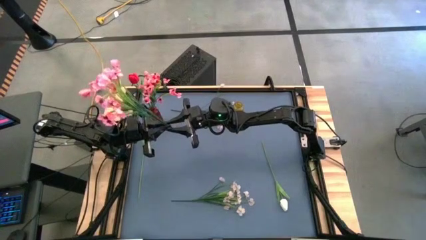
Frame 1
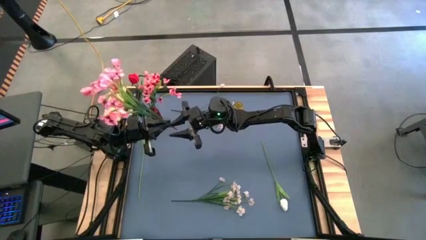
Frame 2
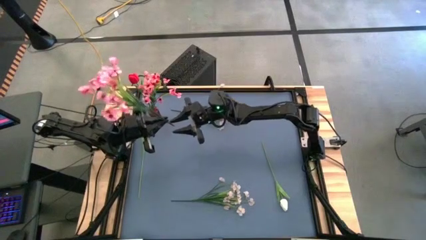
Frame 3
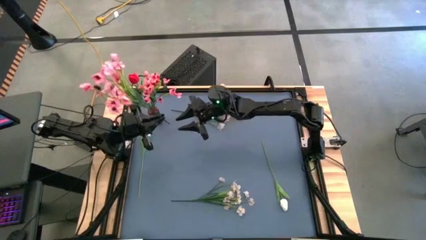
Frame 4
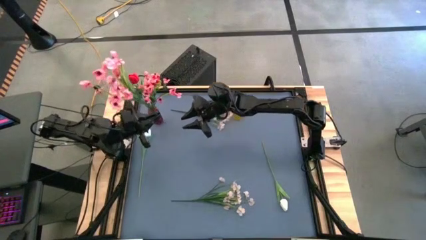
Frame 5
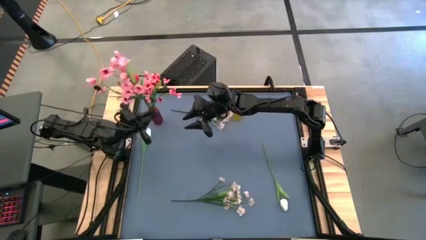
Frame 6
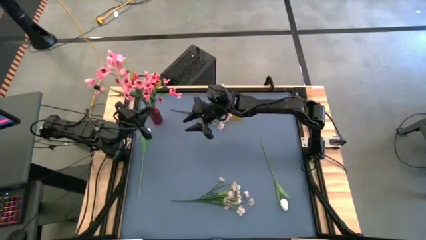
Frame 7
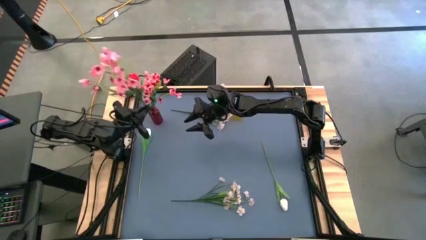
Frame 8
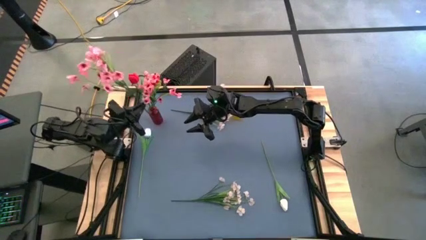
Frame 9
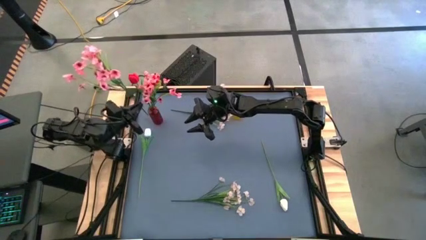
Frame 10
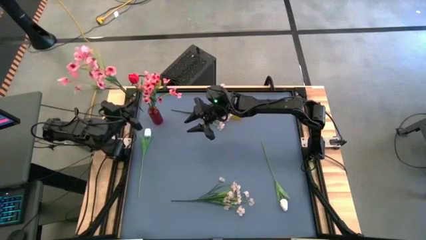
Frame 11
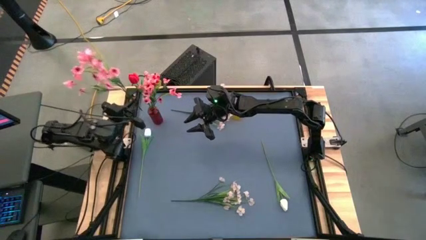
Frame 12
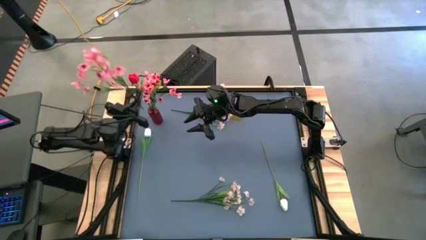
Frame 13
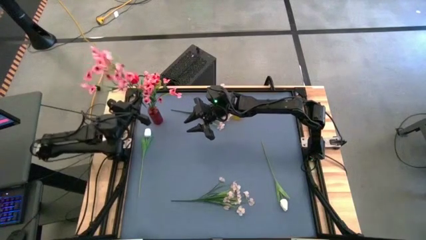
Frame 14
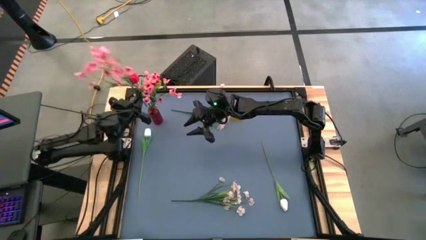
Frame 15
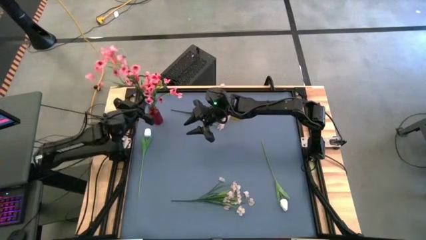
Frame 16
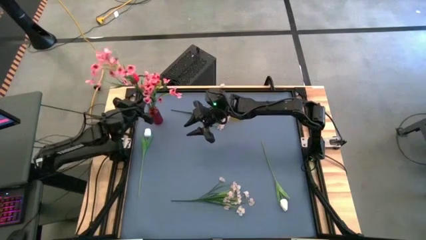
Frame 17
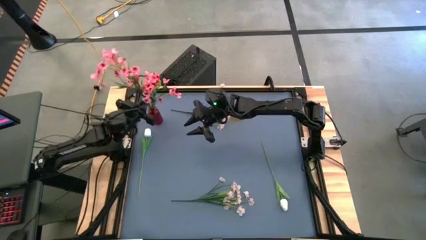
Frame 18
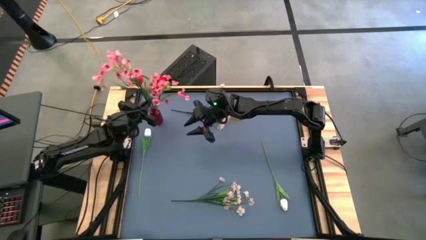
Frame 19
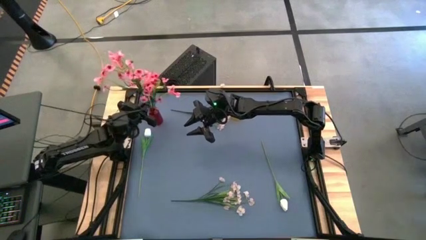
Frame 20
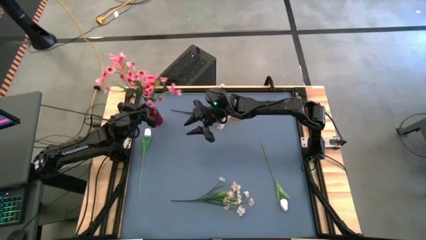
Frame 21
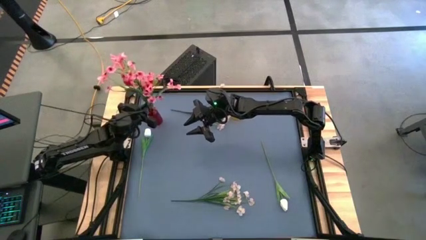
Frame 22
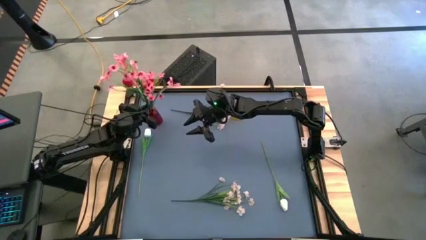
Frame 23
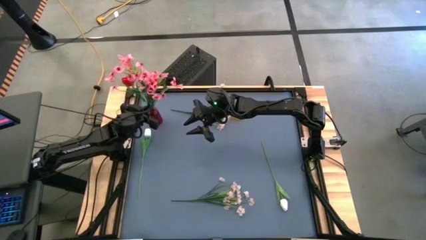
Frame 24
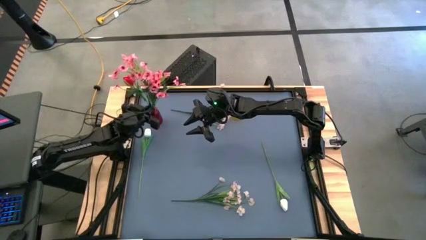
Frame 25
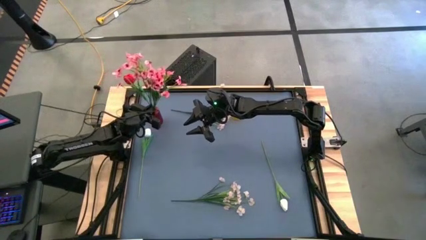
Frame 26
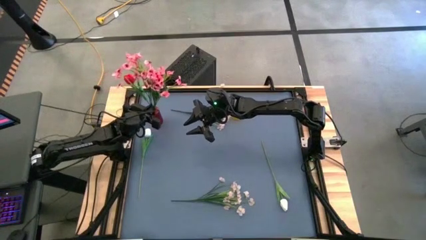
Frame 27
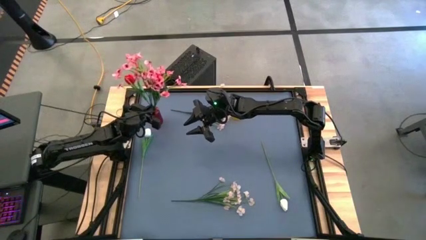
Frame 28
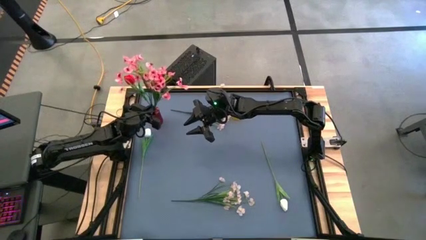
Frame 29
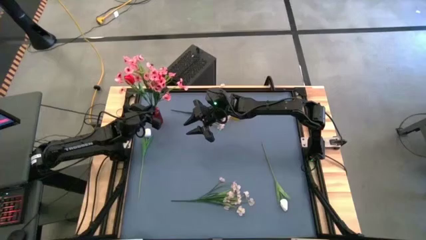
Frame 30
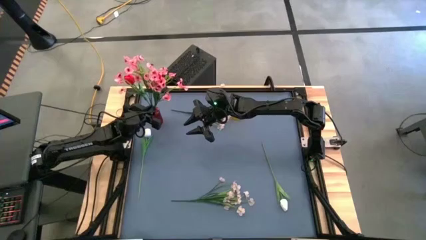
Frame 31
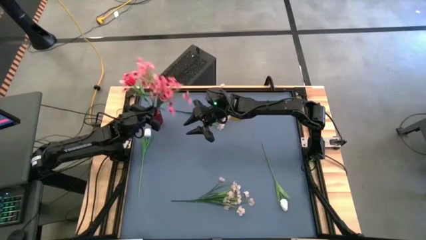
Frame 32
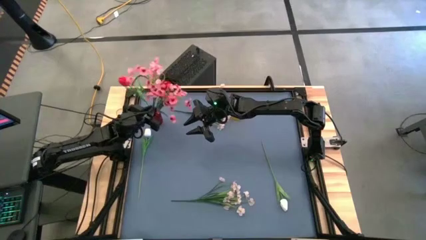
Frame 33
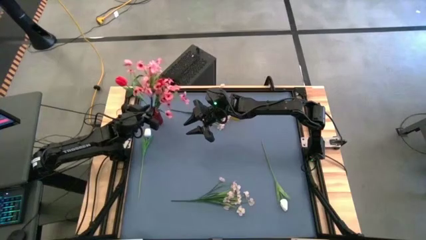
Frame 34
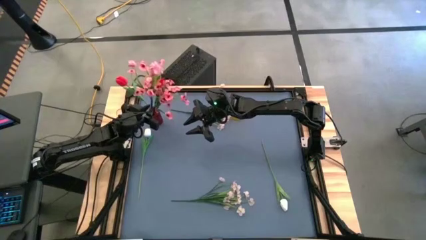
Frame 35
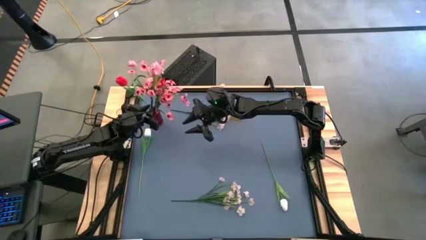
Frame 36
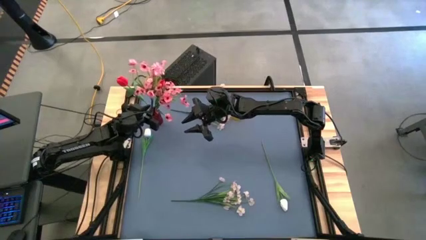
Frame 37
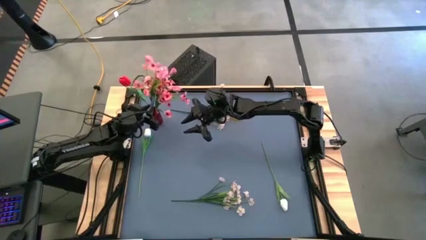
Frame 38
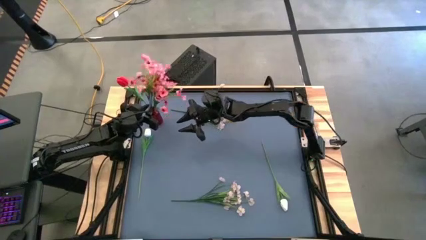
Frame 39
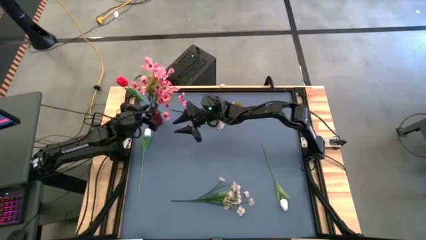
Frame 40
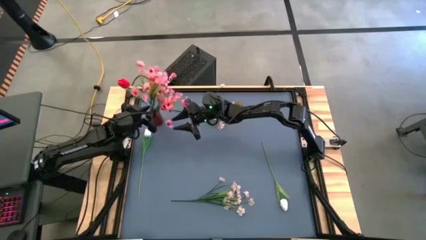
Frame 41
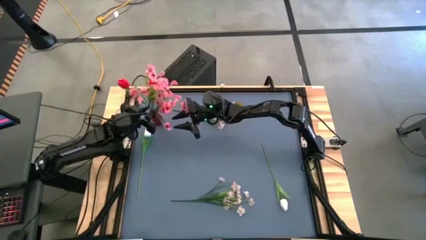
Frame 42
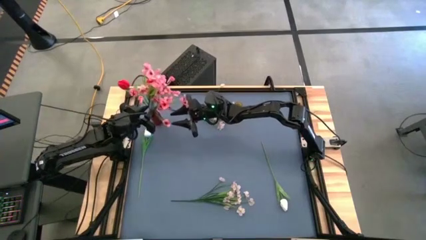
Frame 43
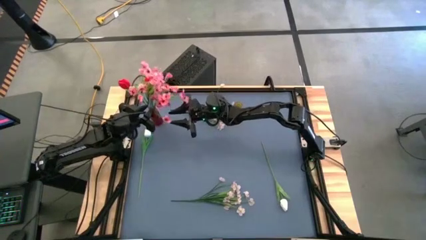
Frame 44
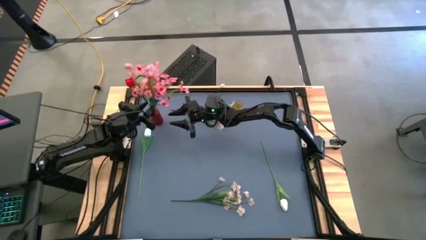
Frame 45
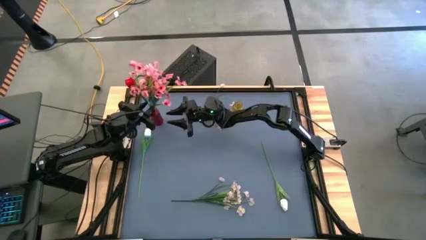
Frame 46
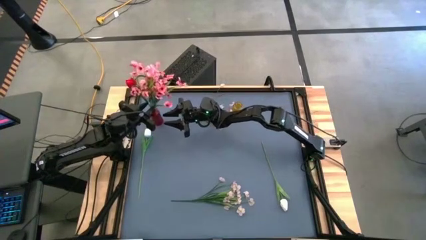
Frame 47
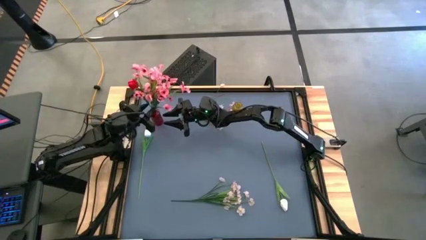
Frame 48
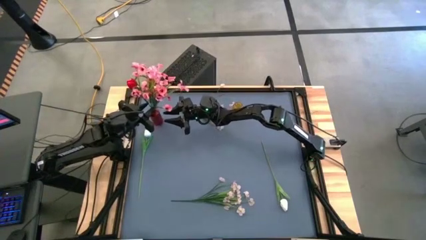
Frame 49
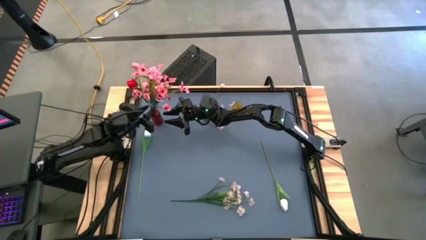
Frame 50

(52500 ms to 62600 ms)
Task: Sort flowers into vase by color
Put the pink flowers into the red vase

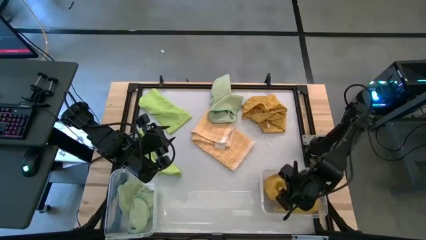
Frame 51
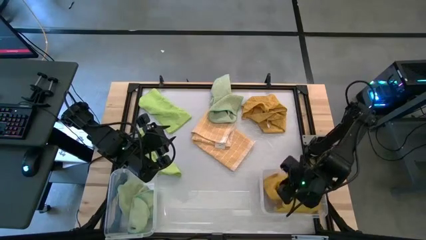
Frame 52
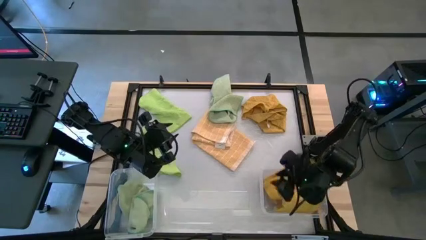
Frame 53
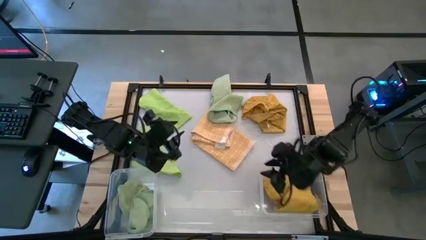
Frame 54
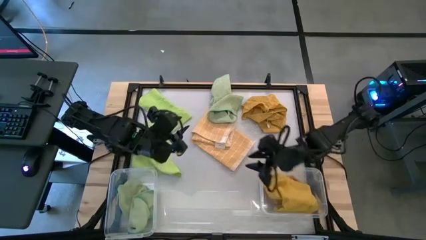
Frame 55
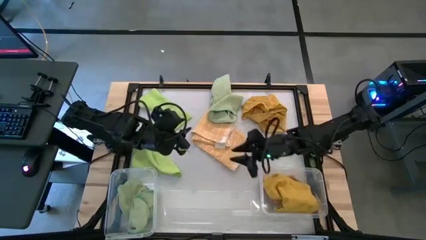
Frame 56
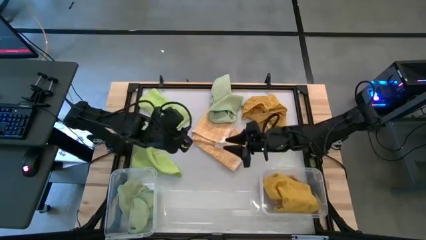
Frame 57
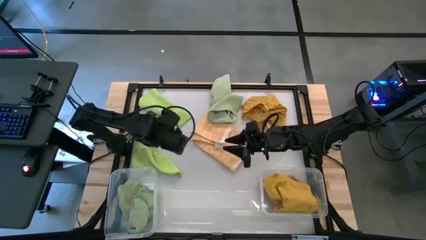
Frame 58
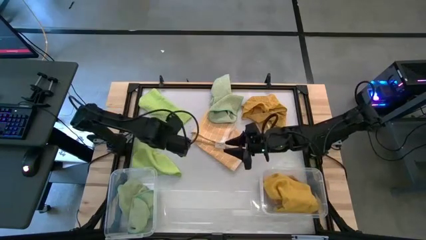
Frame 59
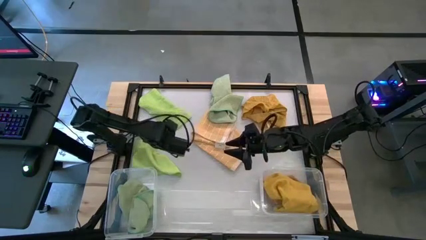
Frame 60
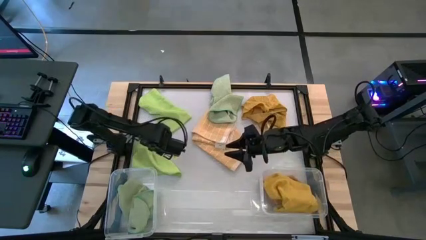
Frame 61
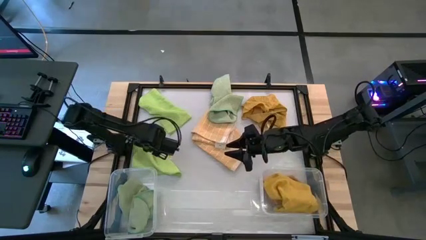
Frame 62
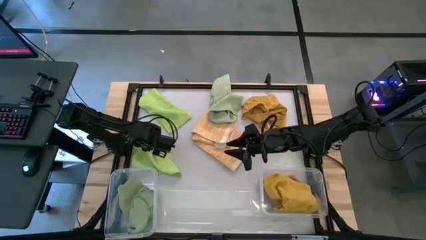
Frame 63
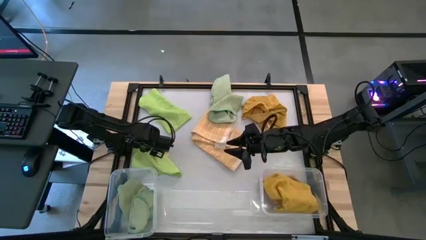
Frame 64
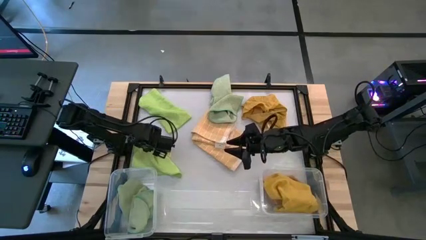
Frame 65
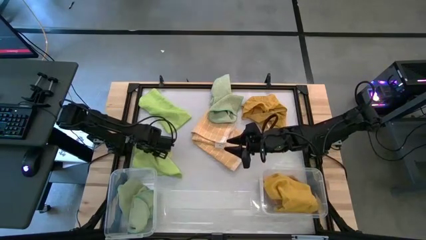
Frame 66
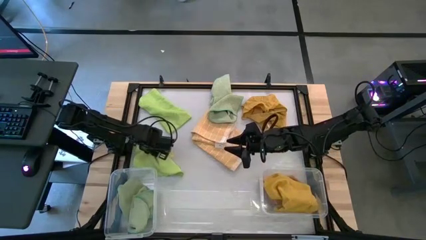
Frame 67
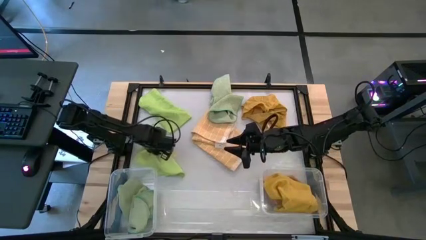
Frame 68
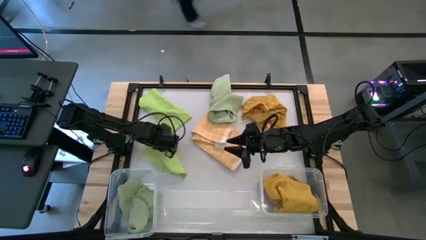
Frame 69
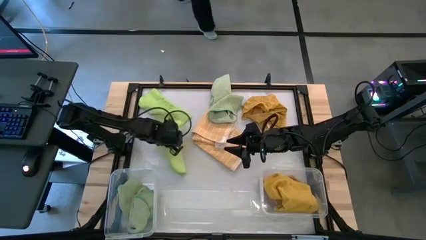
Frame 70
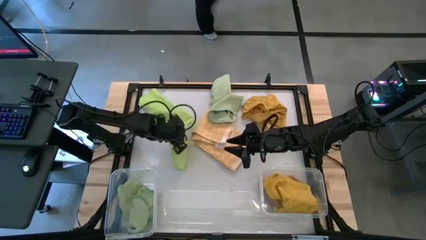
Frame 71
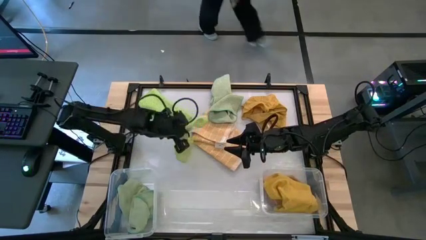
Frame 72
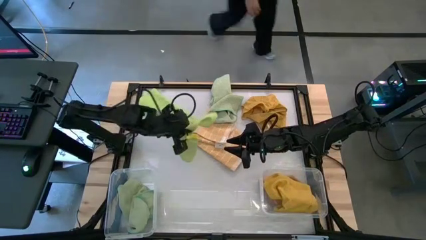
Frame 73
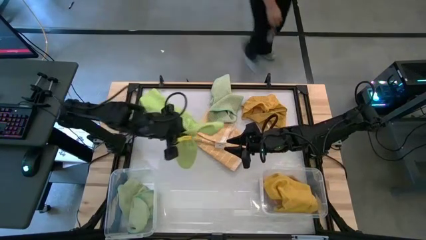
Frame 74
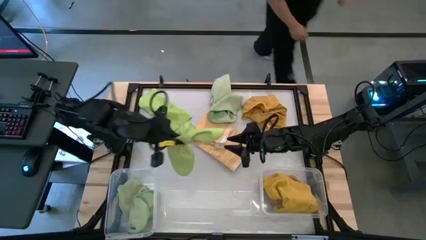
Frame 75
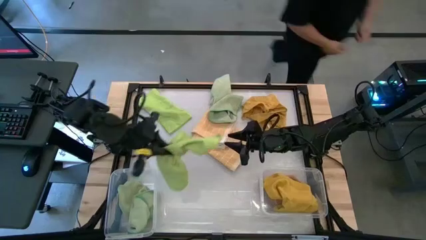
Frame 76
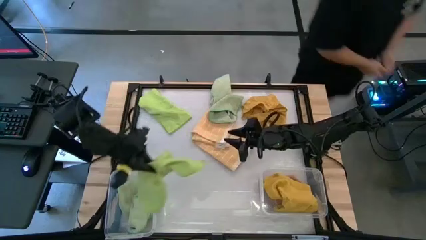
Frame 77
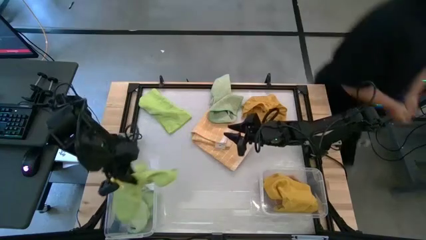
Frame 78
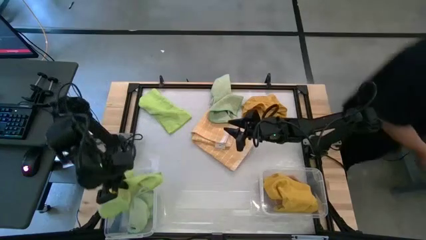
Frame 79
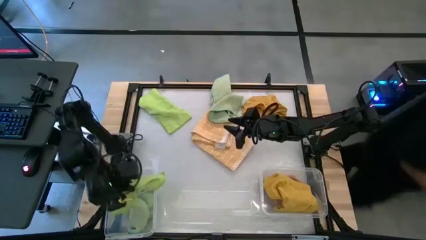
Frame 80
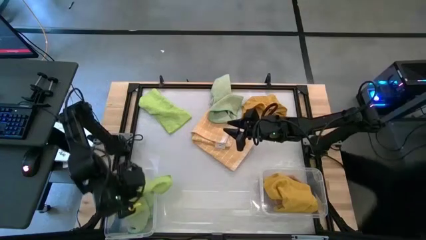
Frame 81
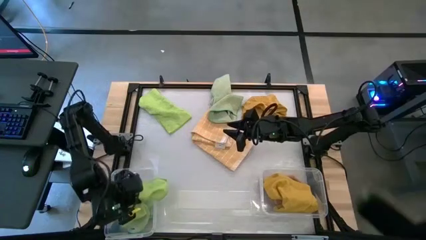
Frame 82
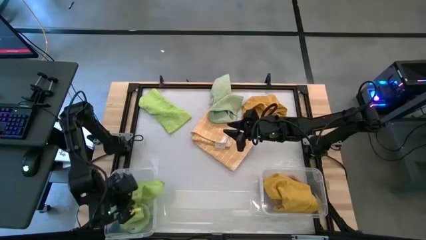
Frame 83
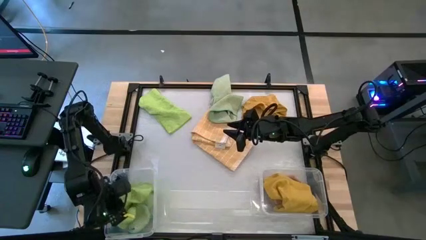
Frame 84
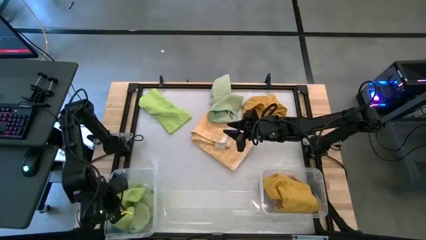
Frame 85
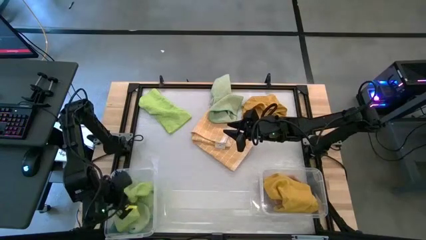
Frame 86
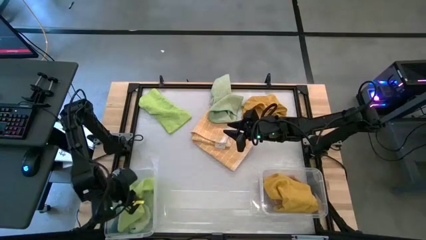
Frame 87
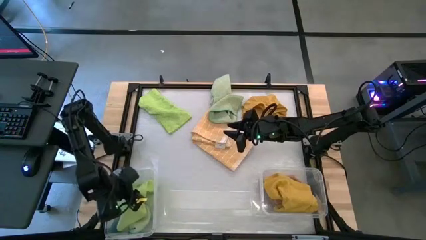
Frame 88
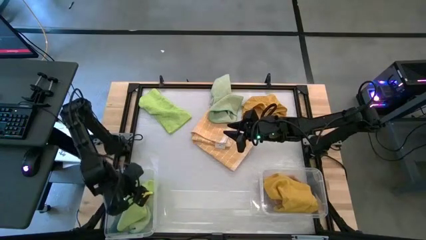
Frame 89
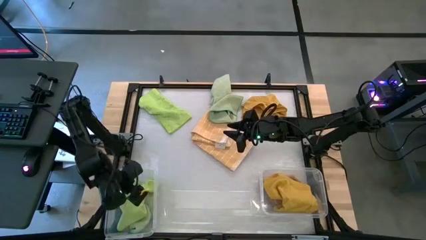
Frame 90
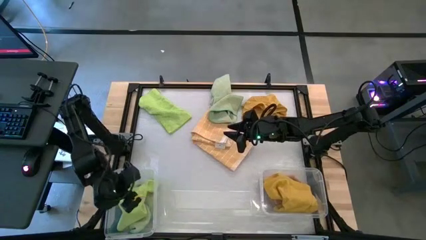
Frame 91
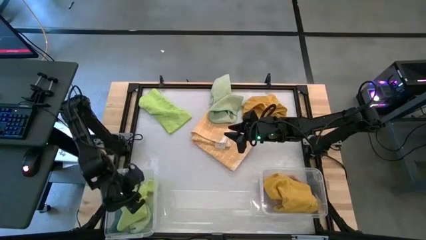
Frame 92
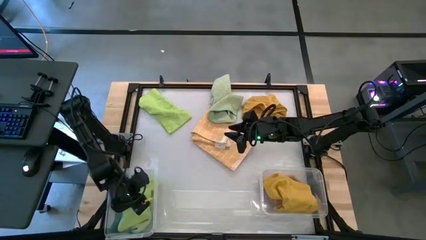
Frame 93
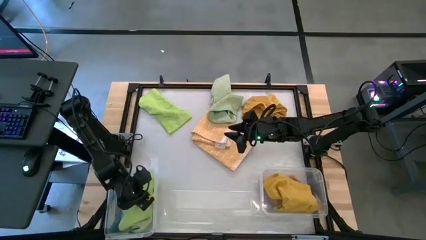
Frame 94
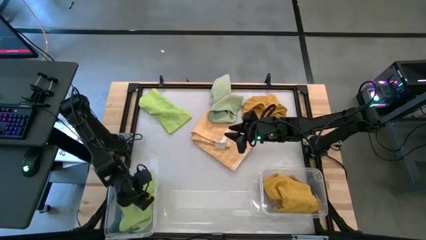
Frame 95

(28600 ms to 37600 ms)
Task: Sort microfiber towel by color & place in baskets
Put the bottom light green microfiber towel into the left transparent bin
